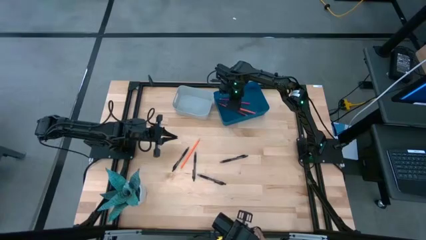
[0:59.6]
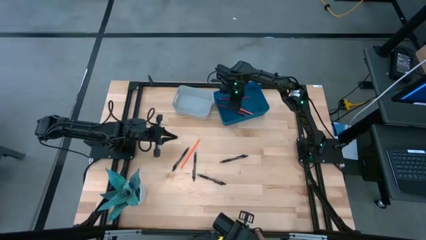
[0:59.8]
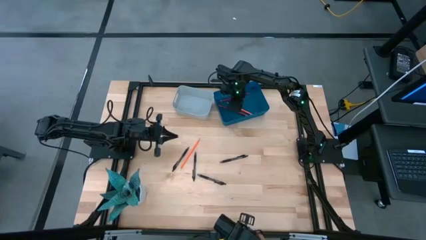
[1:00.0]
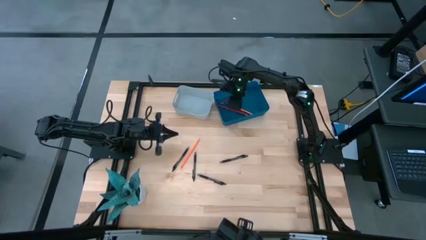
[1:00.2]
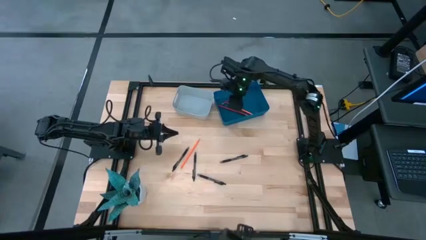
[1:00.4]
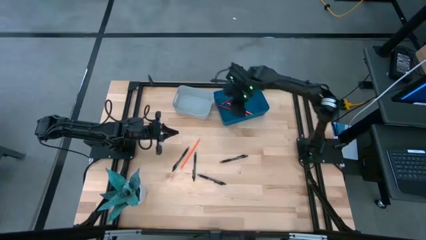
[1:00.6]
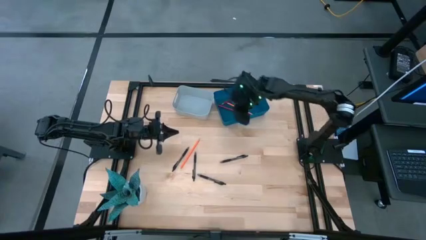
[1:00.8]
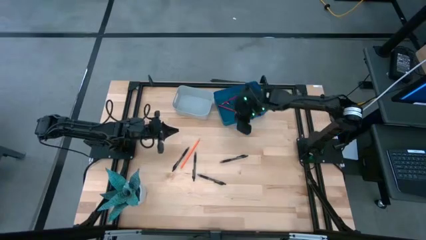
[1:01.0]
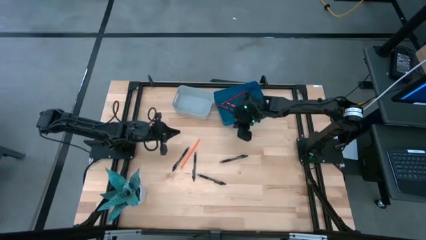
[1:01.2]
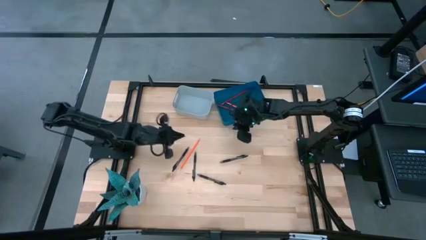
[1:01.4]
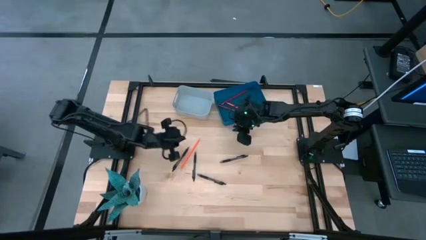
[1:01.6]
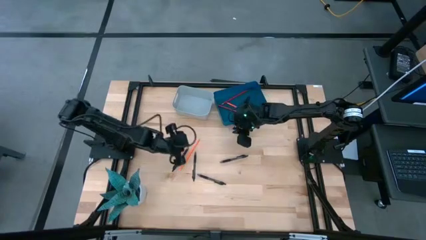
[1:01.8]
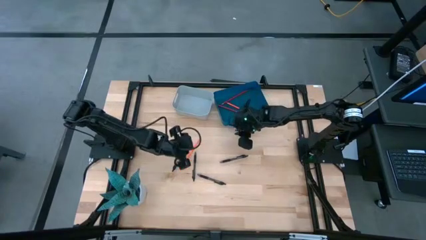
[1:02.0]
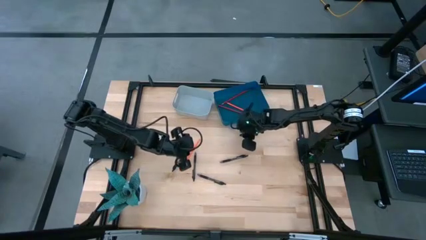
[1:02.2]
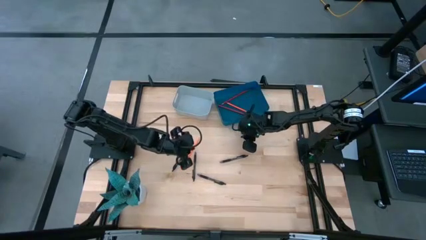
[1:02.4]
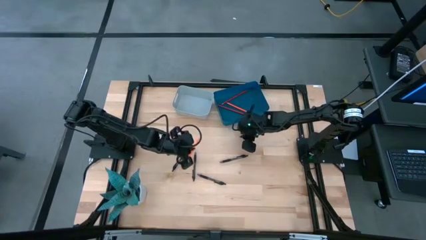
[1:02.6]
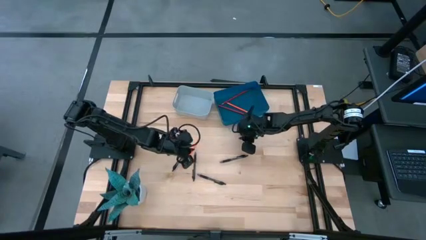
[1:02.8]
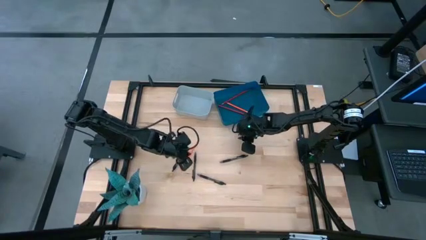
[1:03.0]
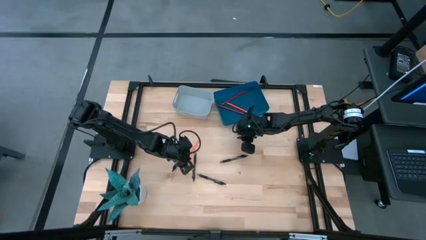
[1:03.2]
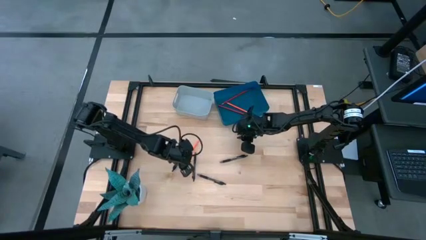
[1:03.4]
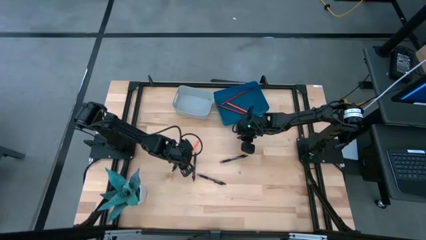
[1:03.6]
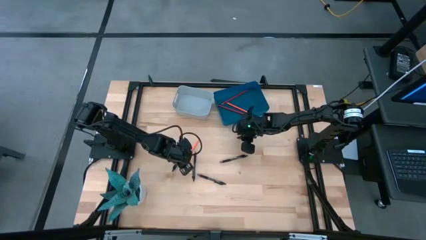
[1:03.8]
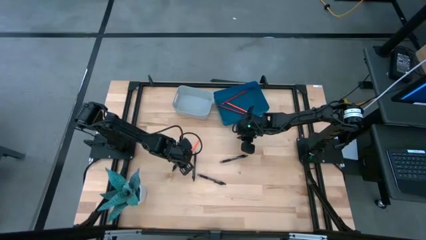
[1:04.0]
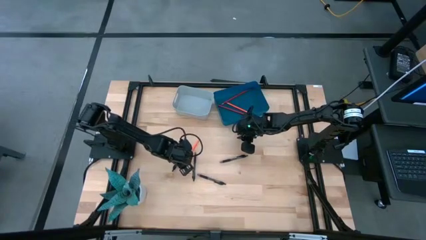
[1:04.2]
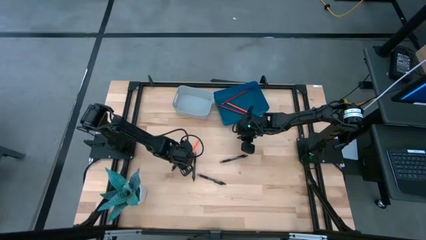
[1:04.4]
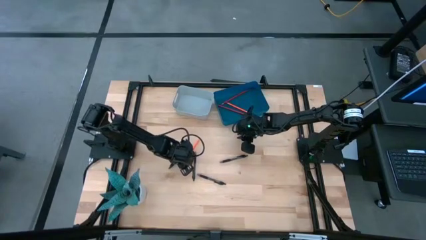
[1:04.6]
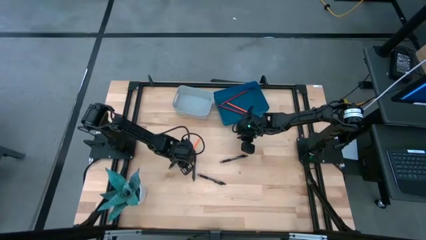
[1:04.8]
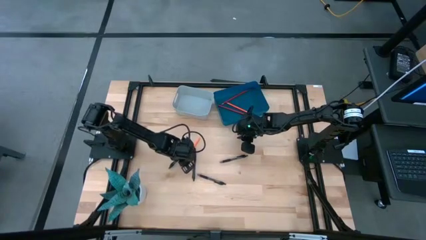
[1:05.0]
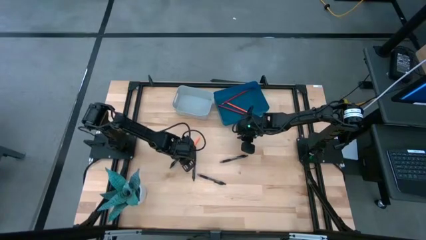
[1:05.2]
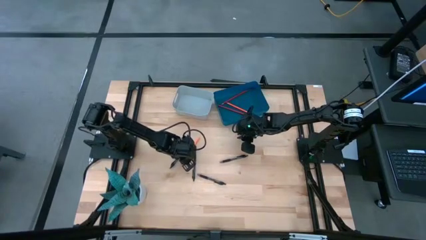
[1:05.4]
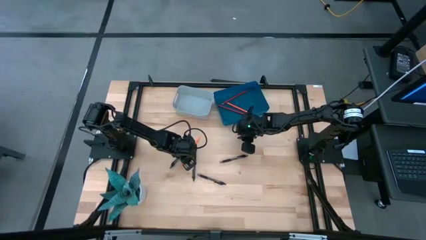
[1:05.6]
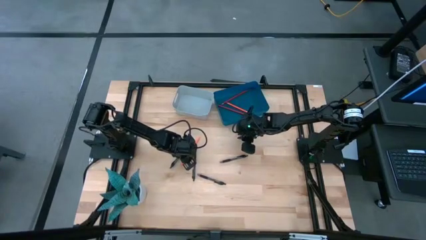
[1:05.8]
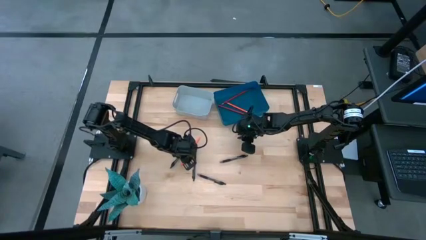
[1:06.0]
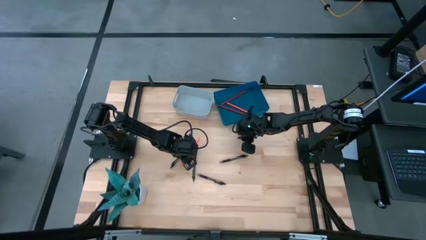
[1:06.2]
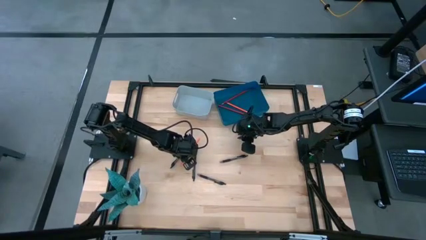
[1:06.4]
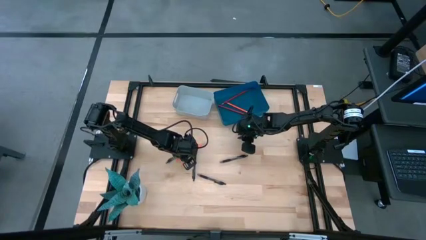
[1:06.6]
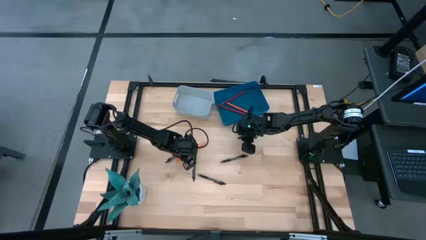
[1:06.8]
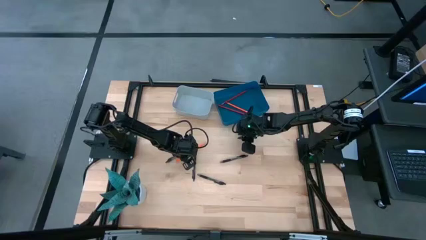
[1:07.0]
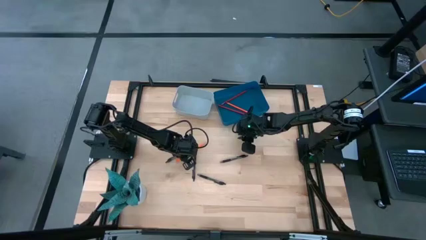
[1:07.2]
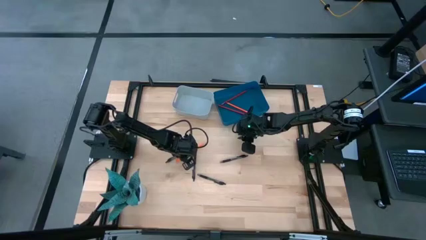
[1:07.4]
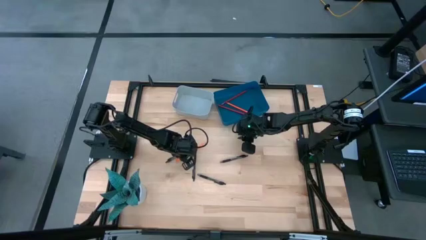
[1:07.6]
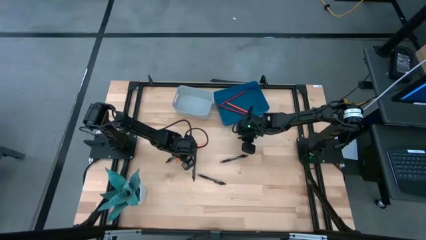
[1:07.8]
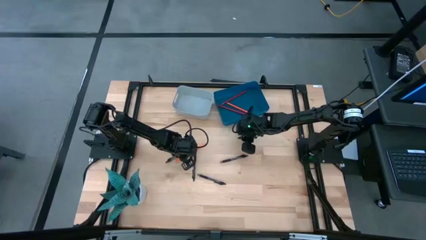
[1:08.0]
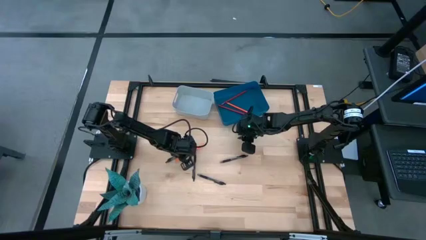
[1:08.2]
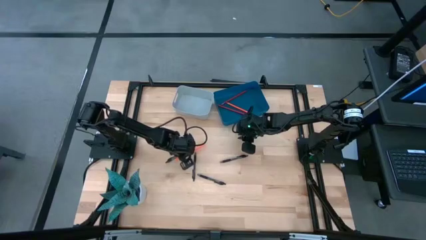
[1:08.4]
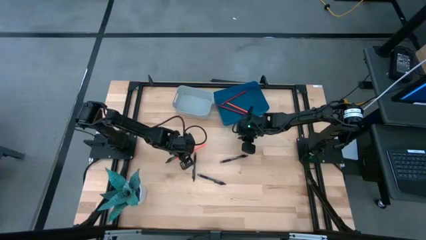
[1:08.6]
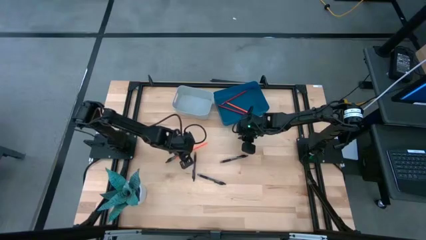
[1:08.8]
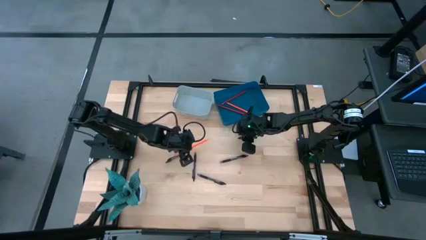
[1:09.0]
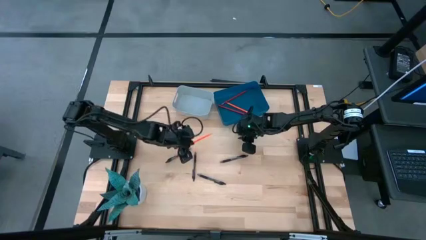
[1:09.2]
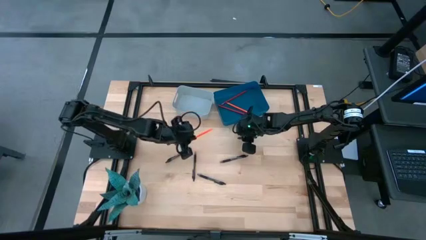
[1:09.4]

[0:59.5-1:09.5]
Task: Sort pens & pencils
Put the orange pencil into the blue bin

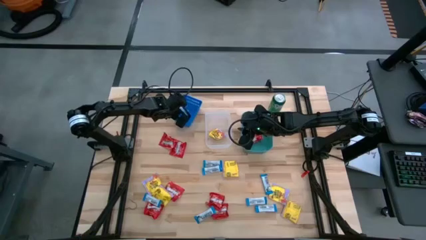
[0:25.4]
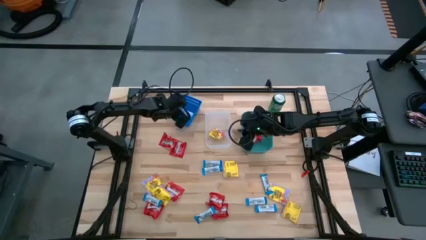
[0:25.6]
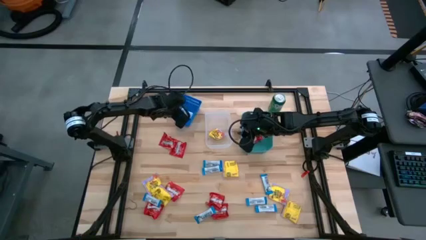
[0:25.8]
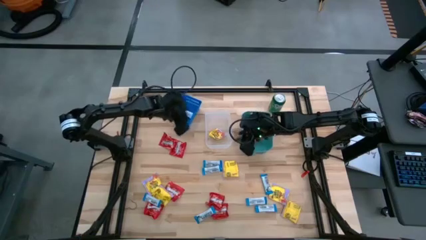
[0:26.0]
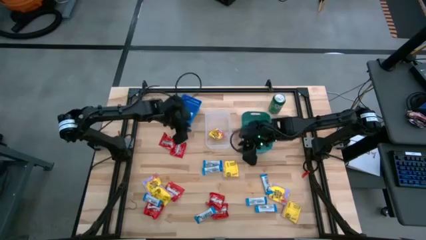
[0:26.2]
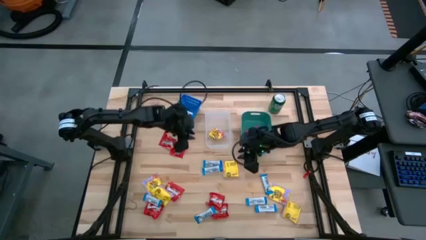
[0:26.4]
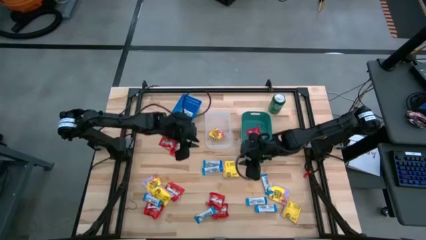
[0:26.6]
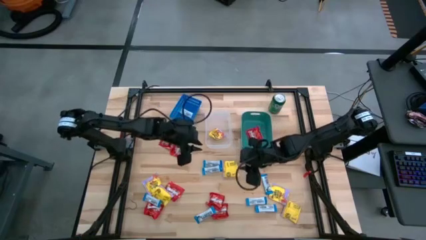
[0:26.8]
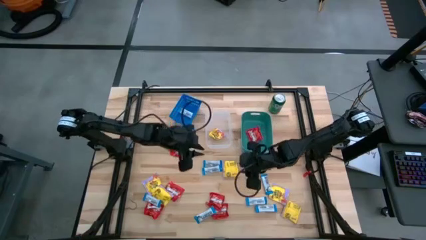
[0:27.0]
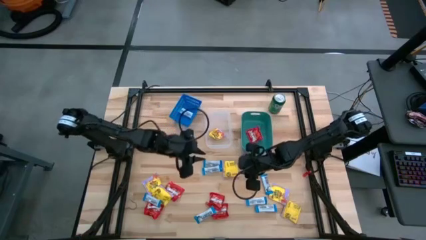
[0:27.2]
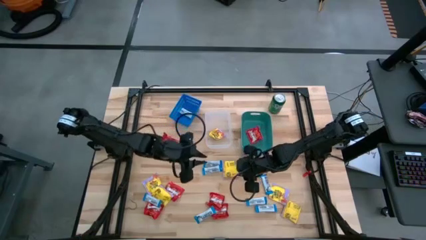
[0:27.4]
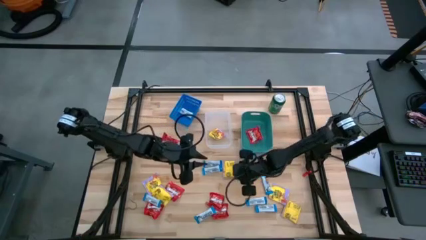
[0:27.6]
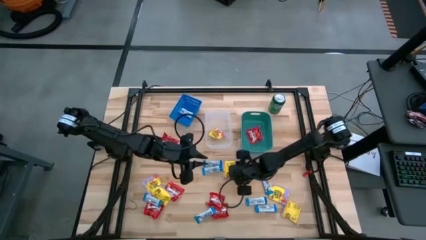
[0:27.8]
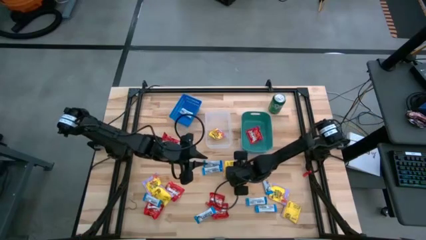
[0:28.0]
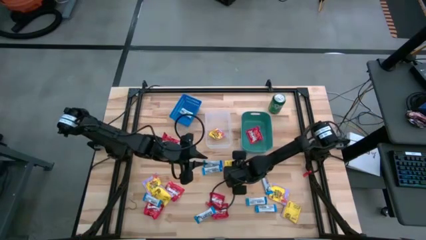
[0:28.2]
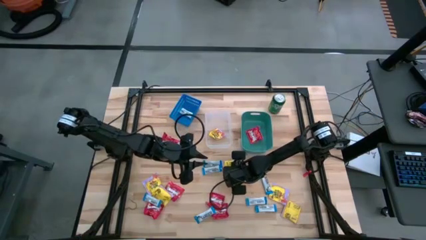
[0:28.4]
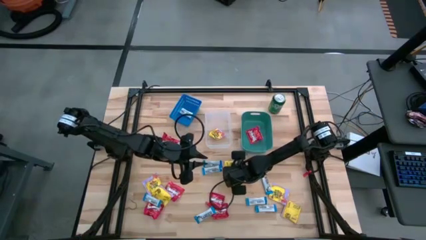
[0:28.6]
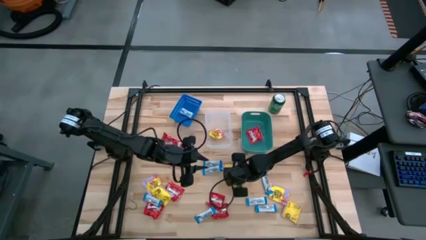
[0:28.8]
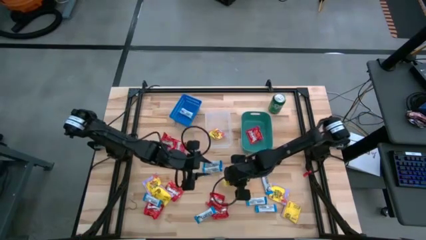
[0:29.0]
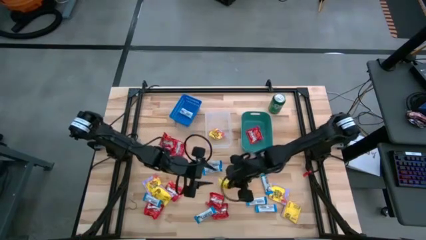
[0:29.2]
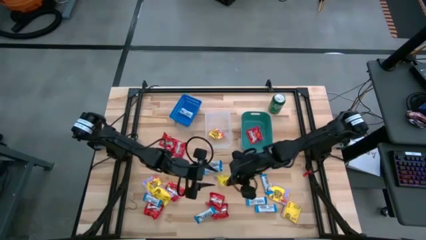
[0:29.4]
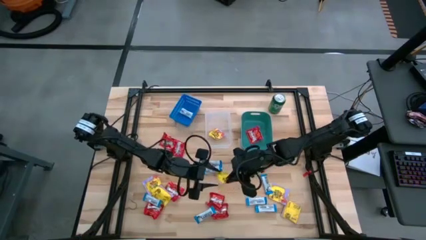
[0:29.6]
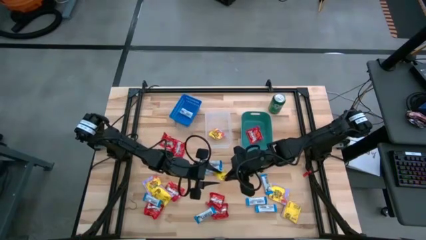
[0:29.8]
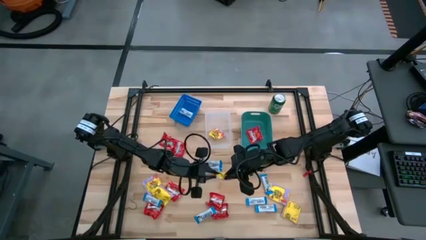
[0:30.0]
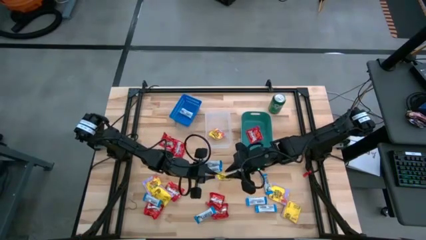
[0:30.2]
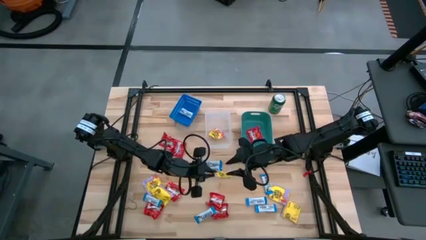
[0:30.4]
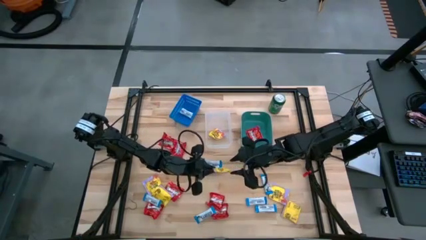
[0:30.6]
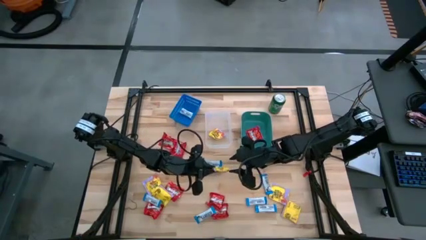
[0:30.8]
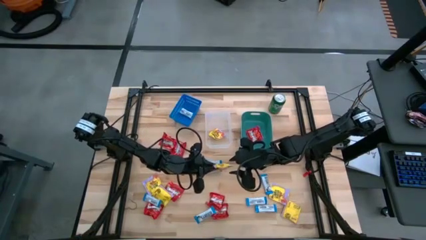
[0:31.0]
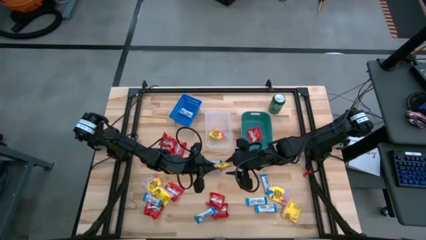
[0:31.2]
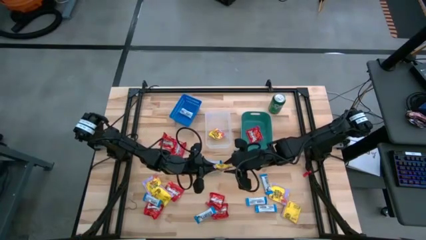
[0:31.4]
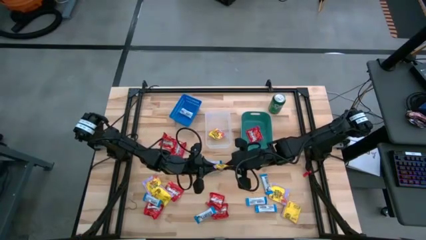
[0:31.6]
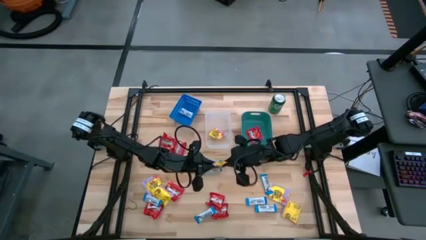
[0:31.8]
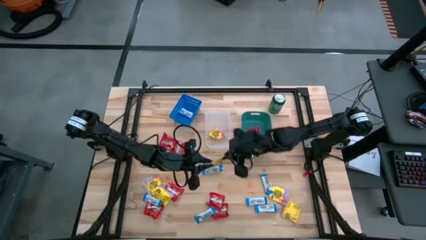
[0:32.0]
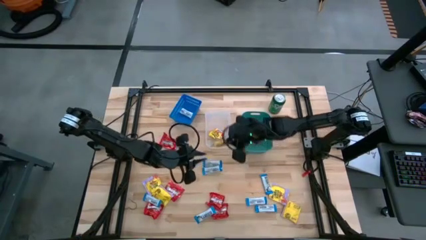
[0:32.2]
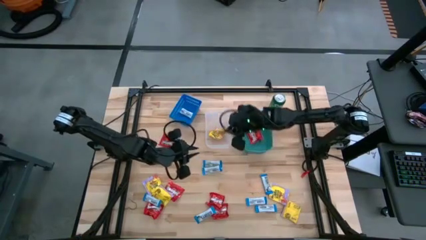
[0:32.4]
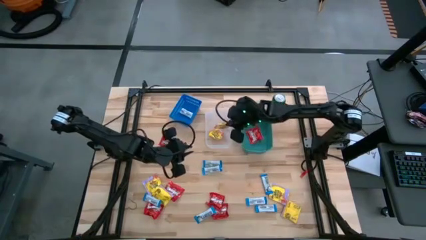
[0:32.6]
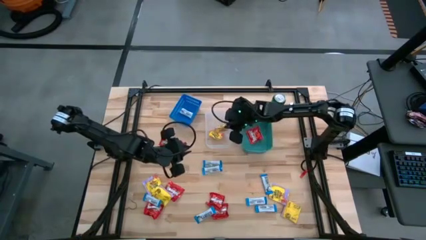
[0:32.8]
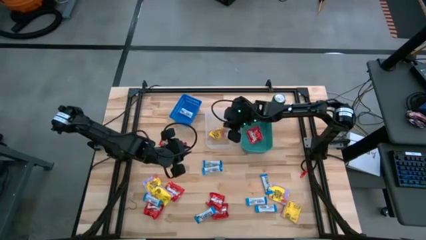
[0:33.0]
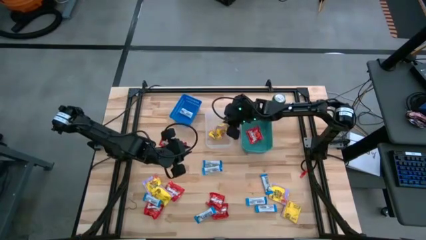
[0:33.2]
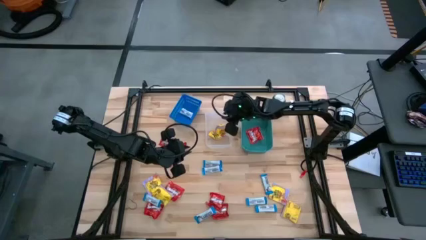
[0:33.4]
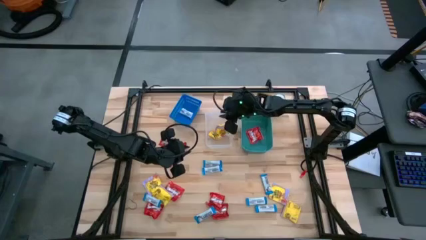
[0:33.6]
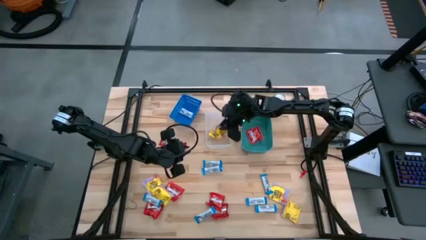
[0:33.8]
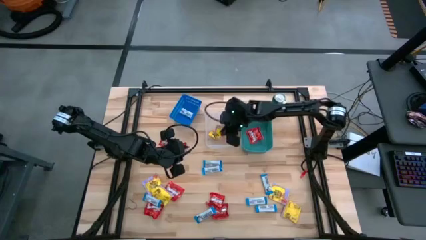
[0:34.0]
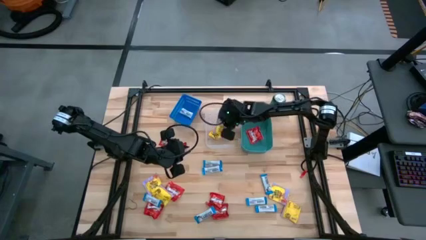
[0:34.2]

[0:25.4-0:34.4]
Task: Sort candy
Put the yellow candy into the transparent bin
